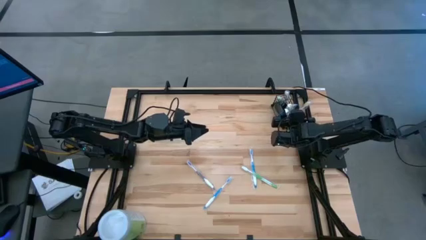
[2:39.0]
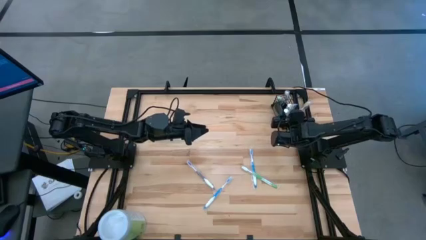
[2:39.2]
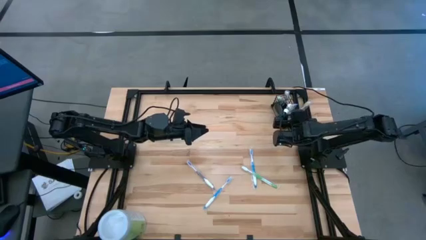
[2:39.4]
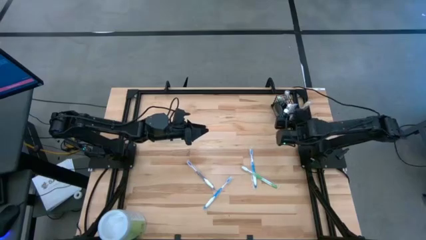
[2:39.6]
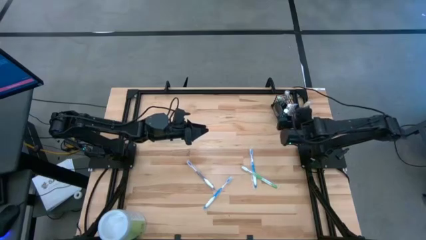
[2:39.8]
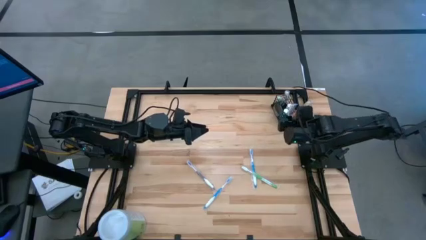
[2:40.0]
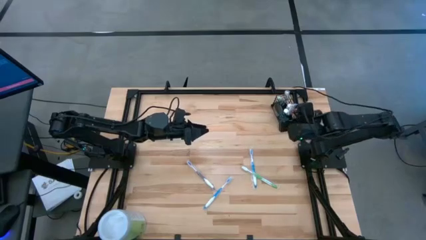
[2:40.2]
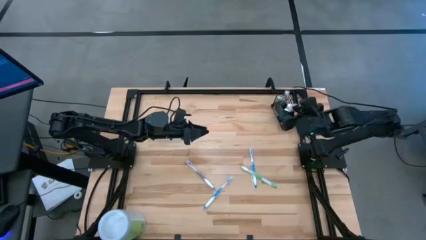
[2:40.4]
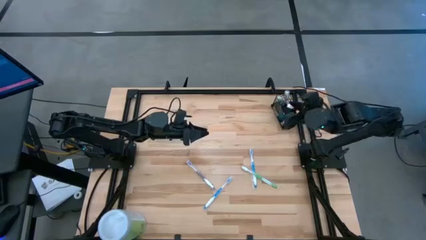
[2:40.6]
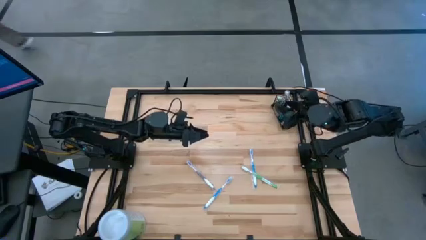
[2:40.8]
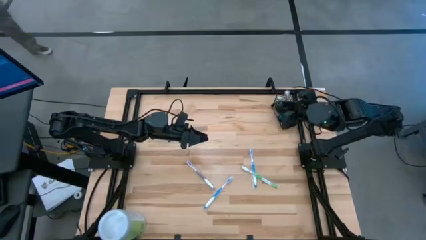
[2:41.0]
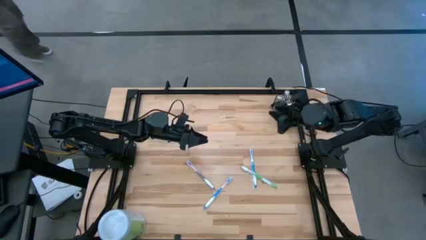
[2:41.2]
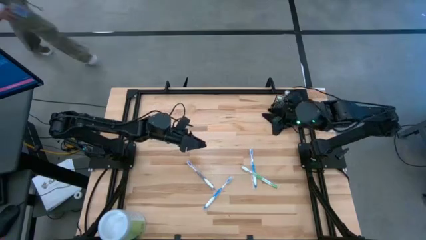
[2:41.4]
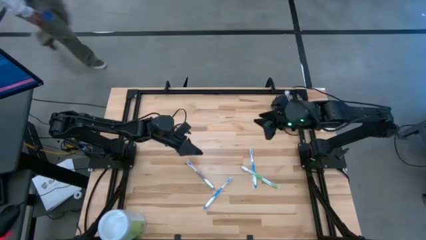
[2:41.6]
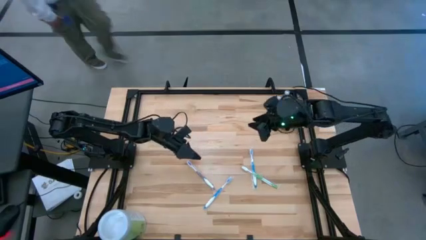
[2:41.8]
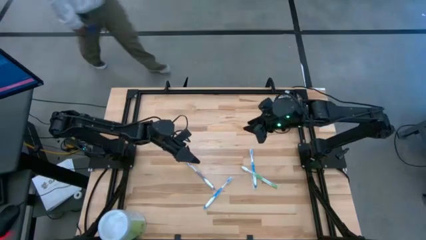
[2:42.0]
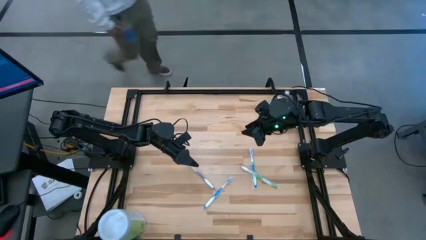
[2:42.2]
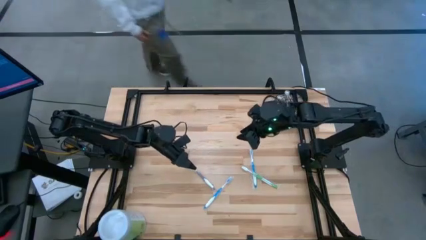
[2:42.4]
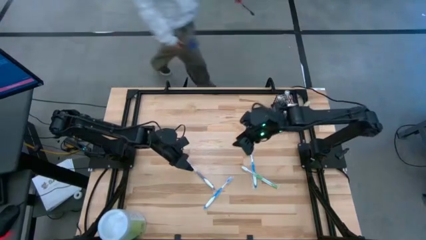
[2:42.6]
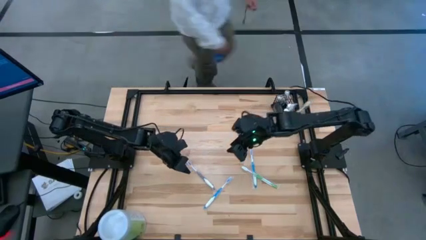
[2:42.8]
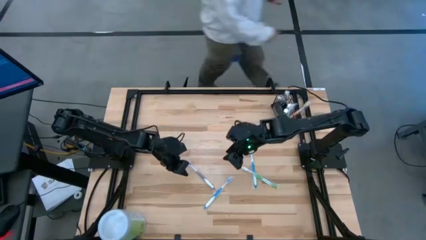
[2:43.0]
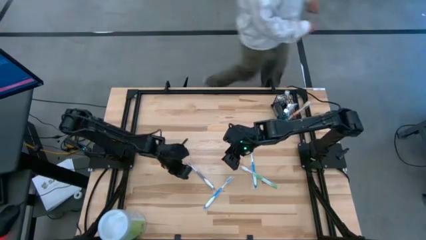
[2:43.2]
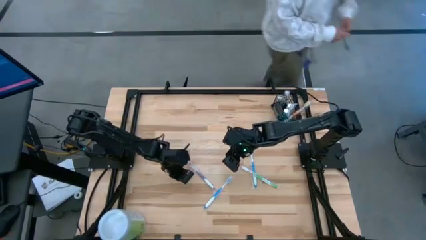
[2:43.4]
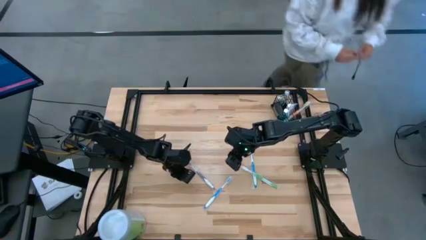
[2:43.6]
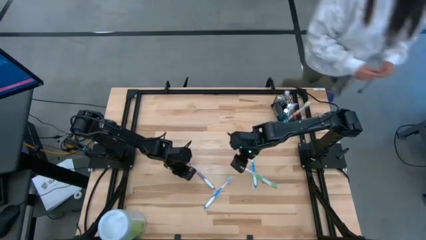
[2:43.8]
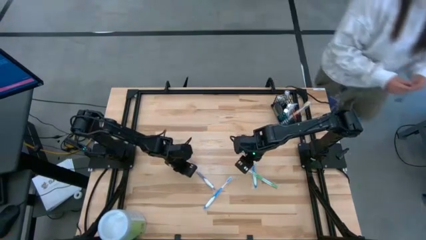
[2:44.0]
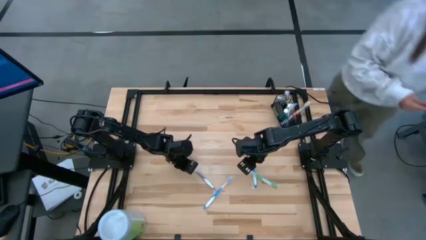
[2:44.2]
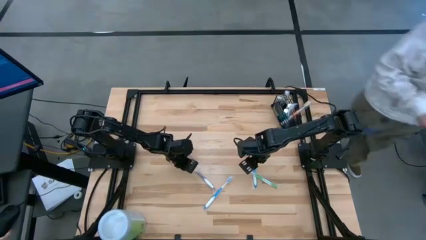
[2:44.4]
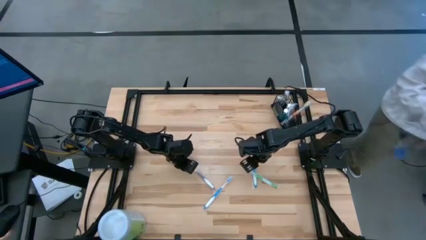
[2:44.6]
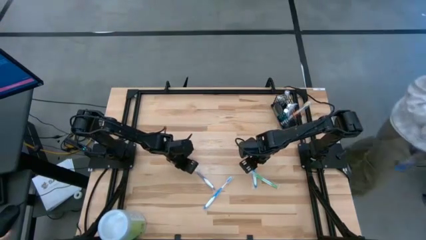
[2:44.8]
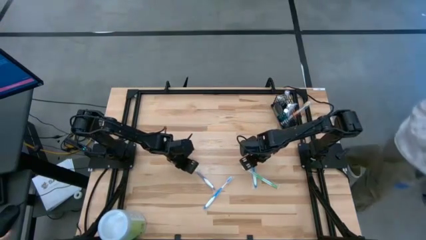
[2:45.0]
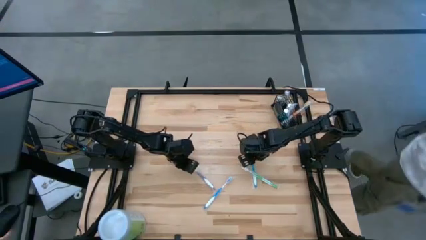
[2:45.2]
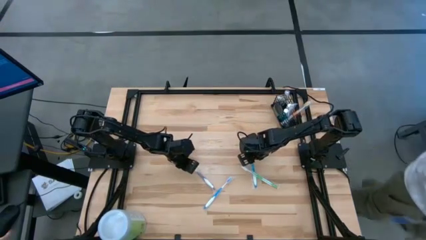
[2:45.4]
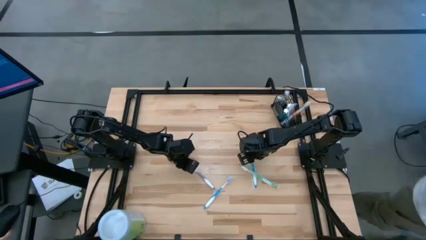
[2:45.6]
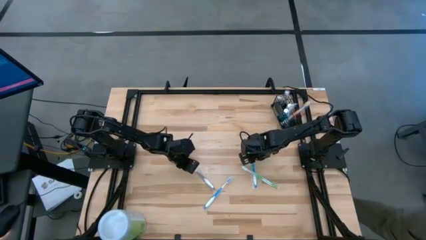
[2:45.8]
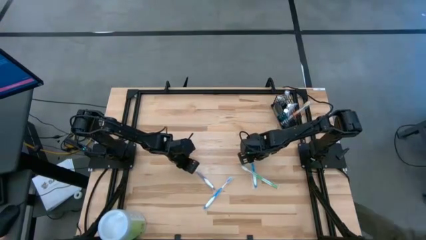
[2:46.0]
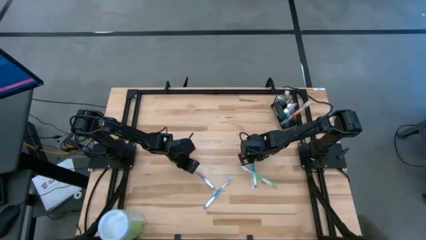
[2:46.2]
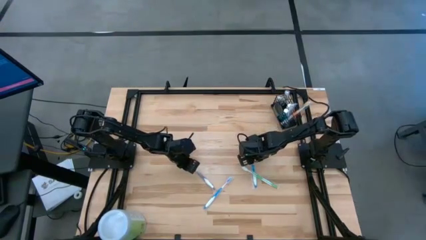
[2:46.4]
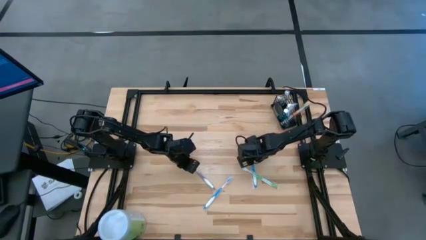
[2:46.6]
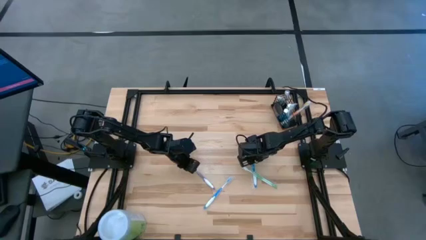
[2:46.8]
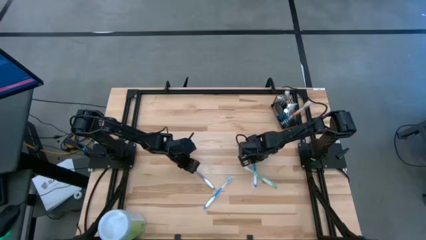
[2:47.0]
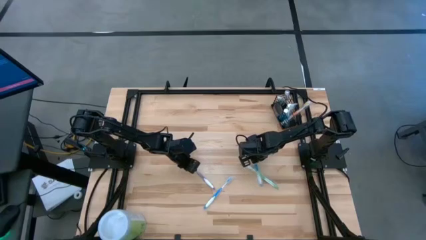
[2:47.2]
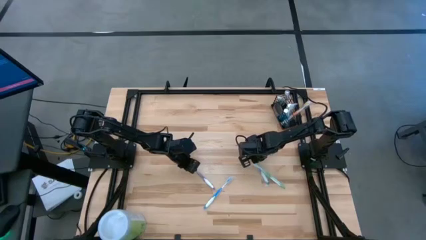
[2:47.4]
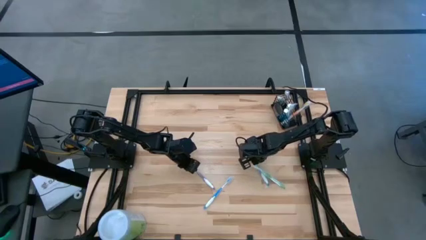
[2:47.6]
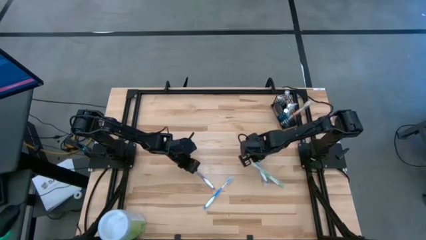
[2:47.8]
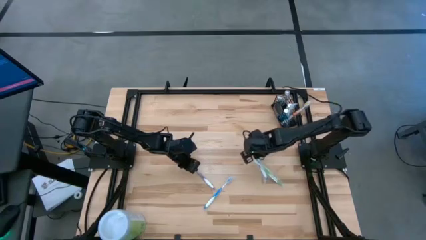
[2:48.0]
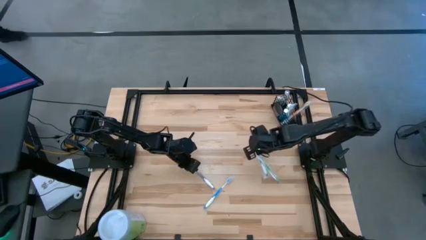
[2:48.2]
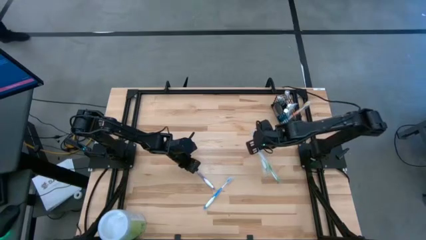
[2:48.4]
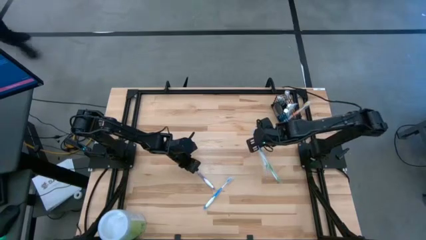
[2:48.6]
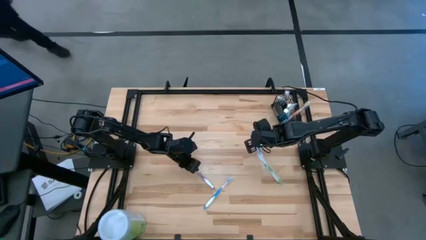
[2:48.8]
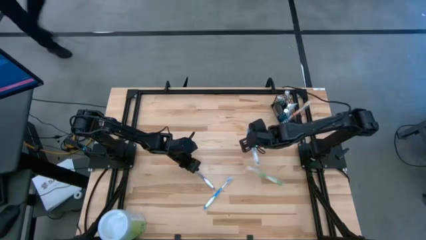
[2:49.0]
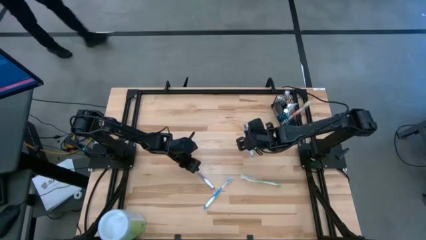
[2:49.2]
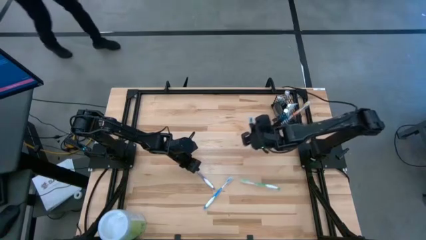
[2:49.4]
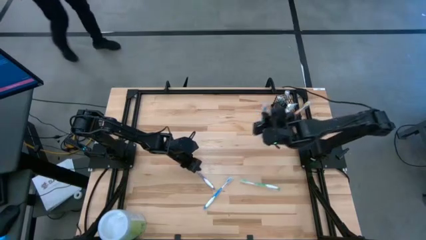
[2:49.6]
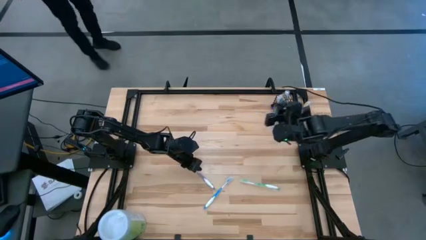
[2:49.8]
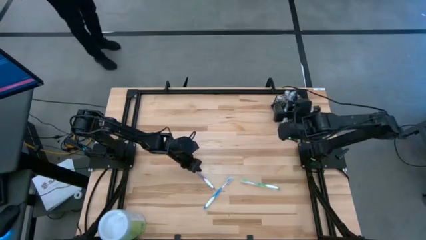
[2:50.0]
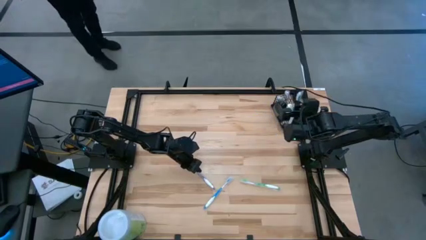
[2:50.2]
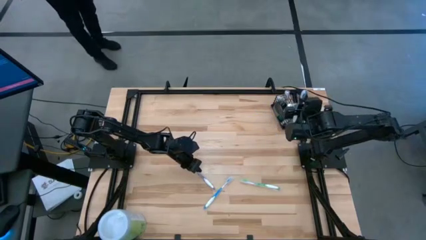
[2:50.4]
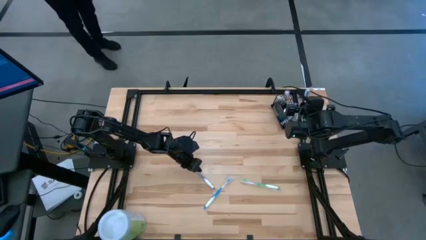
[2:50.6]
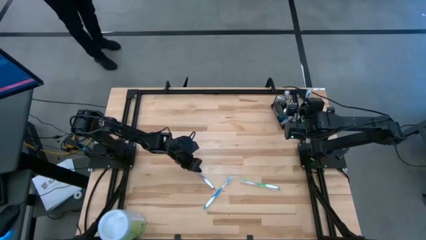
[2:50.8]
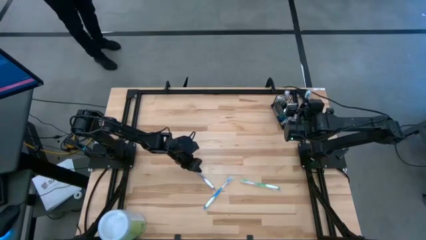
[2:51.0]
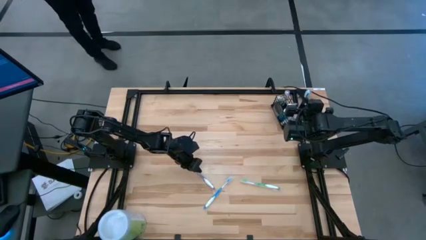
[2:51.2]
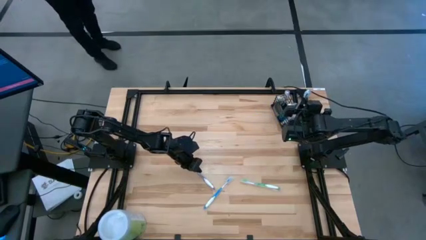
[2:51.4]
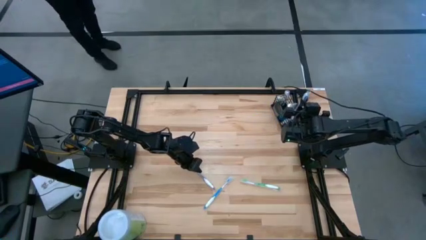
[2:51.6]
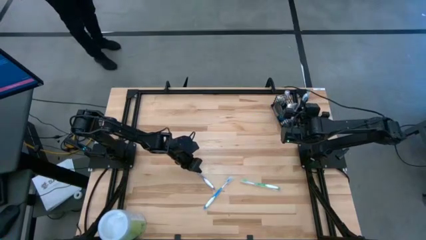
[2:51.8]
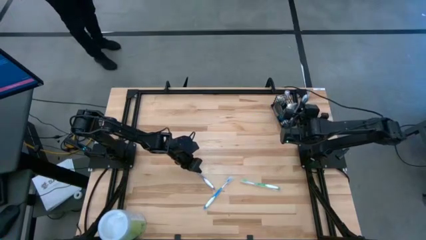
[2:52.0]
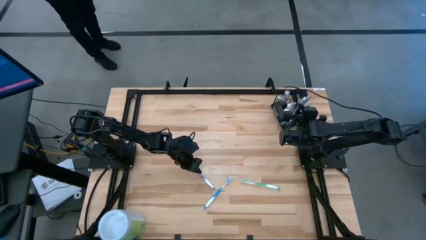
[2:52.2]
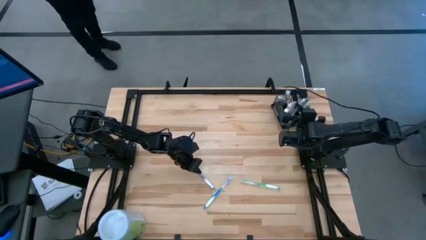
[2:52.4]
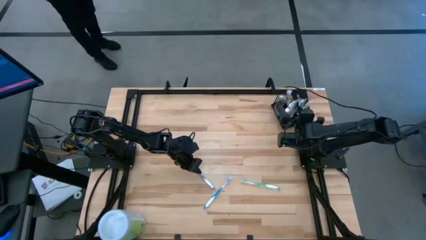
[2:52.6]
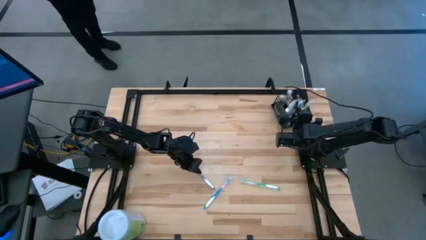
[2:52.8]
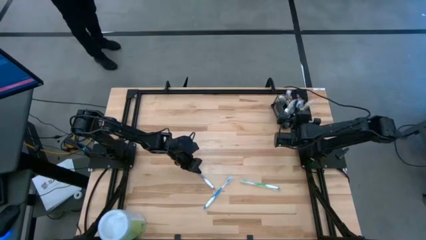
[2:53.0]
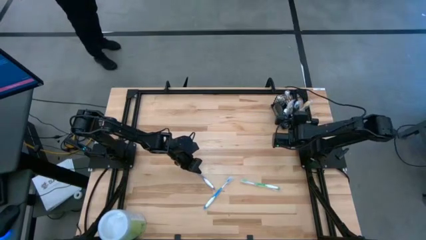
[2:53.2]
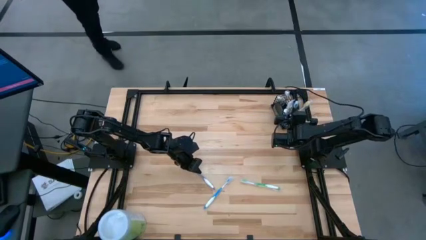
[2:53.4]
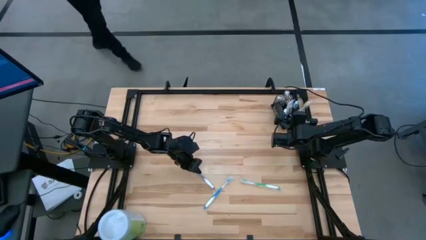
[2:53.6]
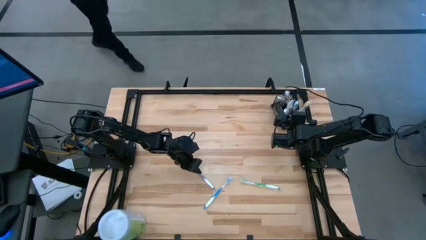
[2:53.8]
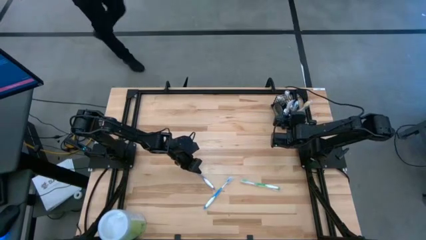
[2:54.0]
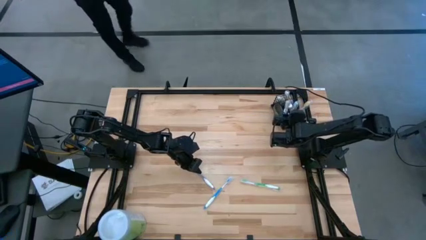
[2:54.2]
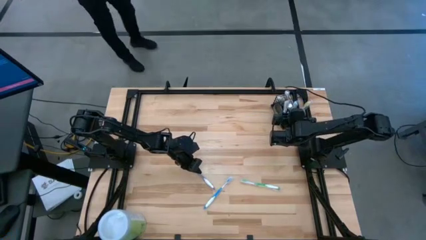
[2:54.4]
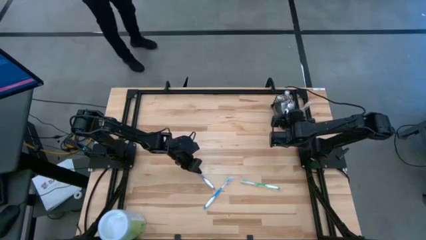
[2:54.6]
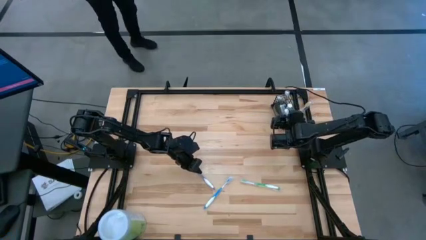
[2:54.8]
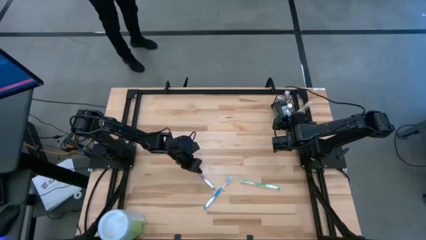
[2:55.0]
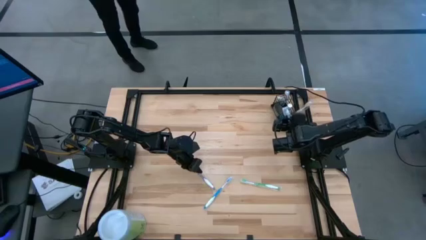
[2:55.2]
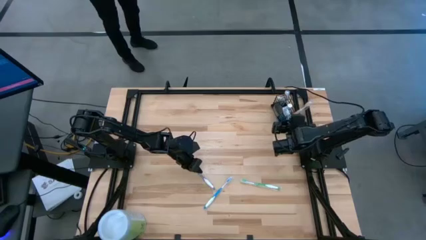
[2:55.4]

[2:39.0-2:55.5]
Task: Pick & Place toothbrushing station
Put the right blue toothbrush in the right section of wire organizer
